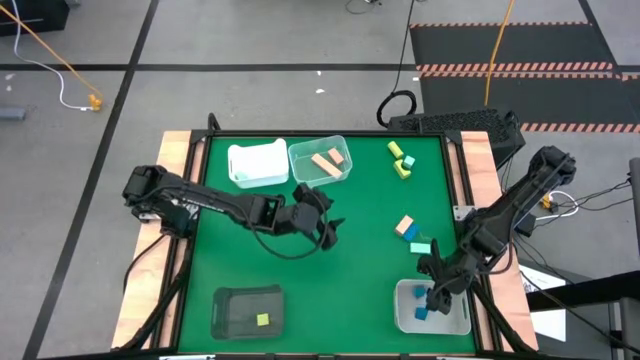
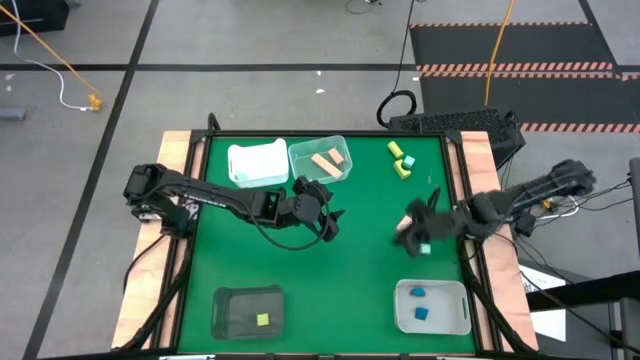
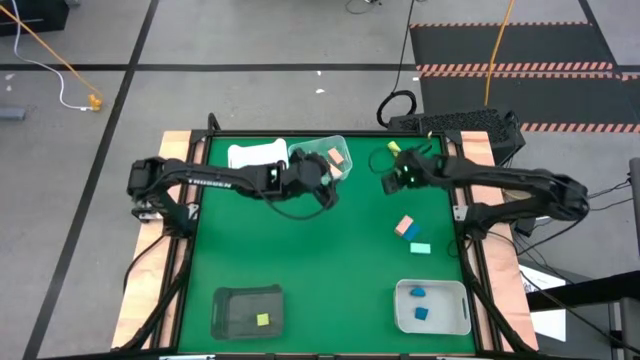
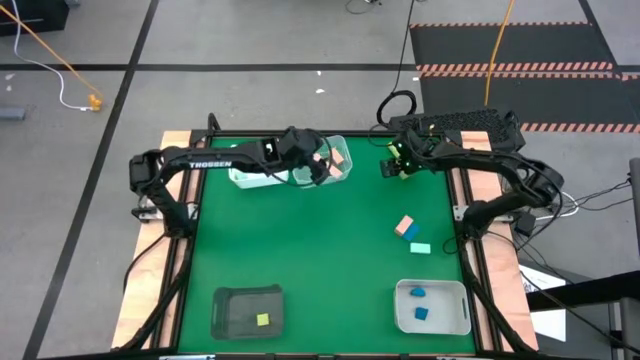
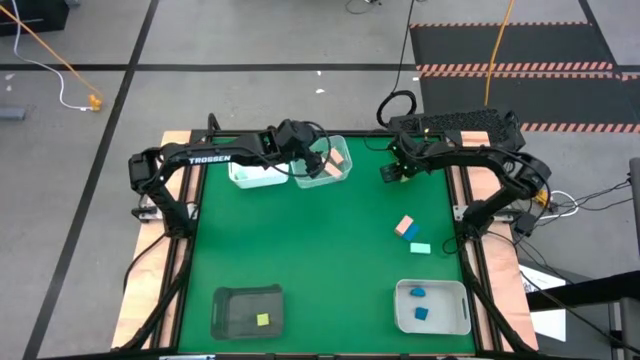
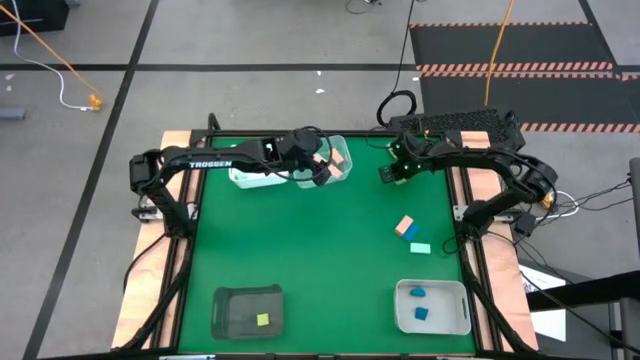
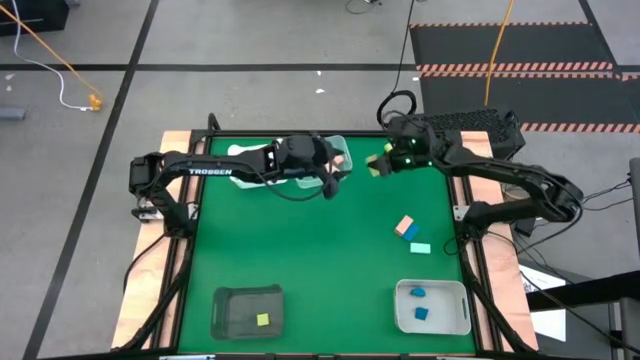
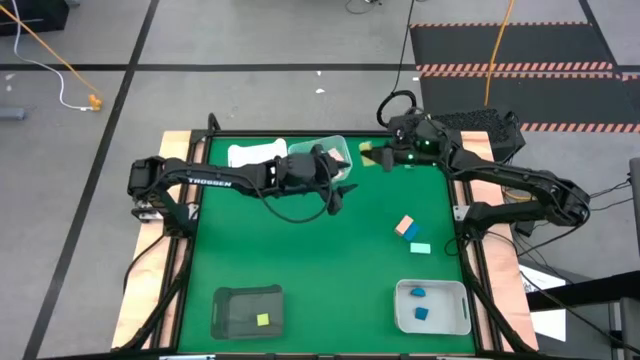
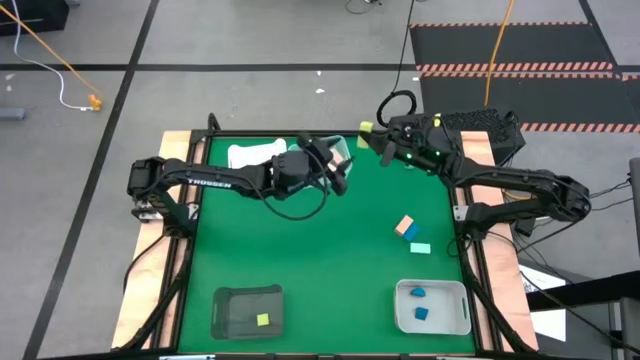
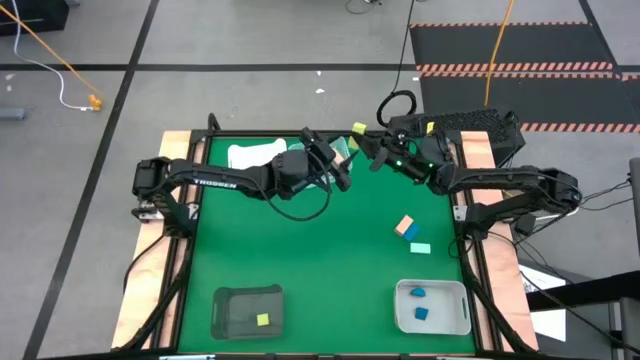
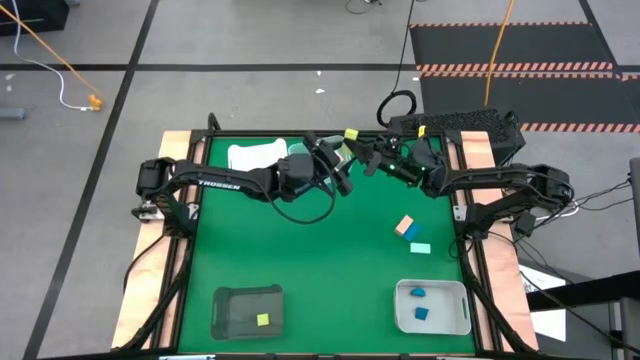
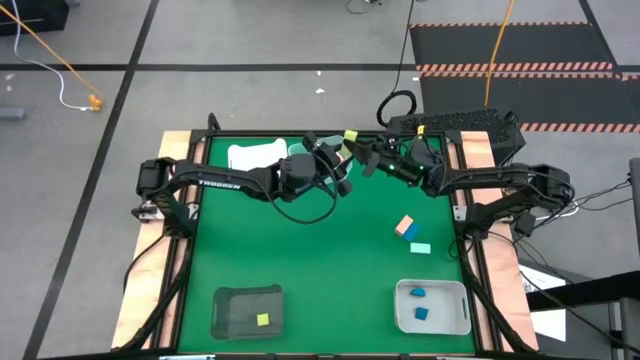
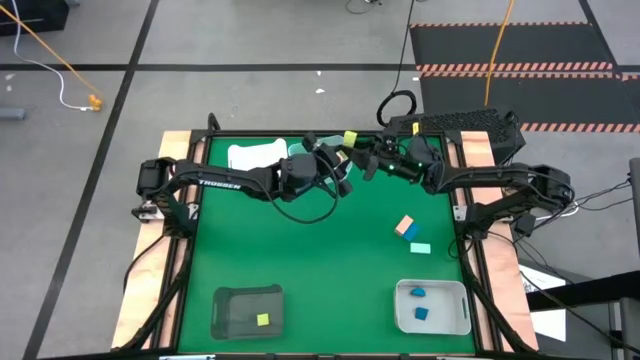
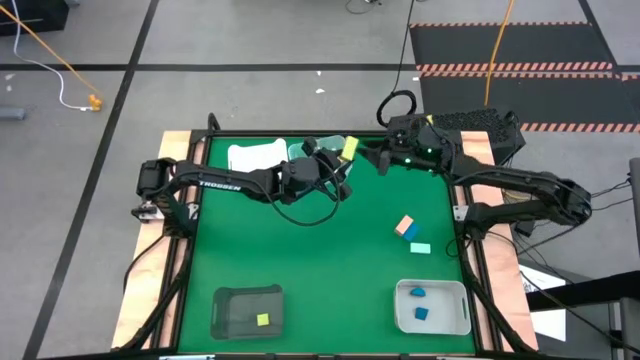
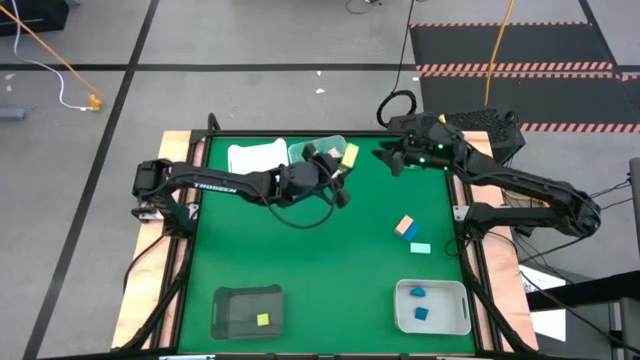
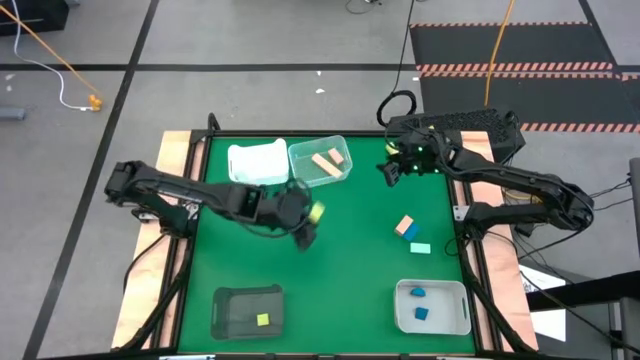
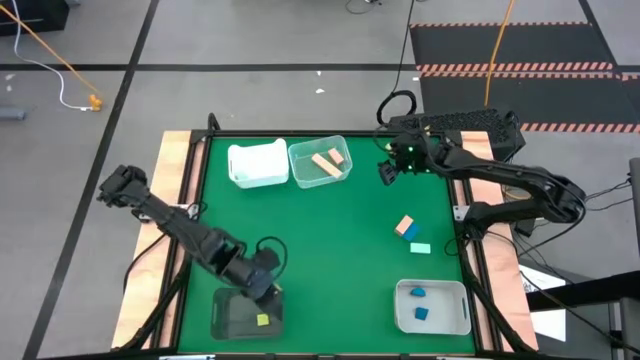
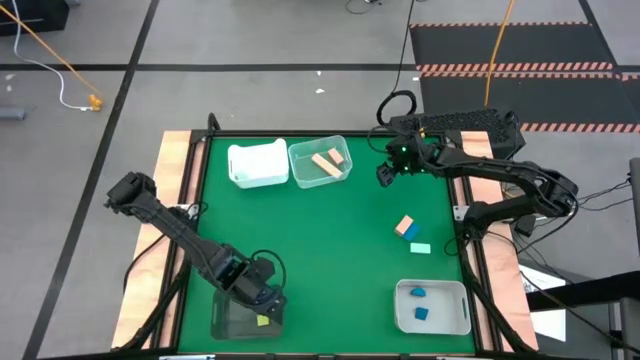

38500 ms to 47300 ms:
Task: Sort & place blocks by color
Put the middle yellow block into the black bin

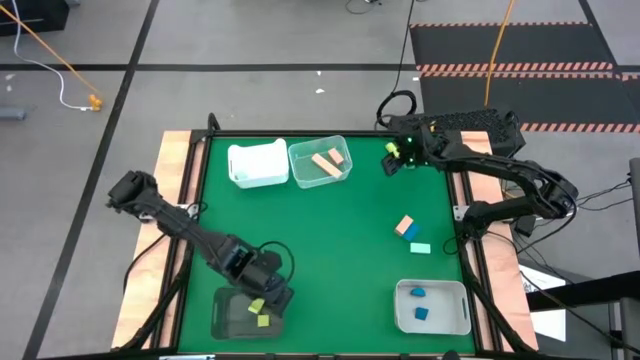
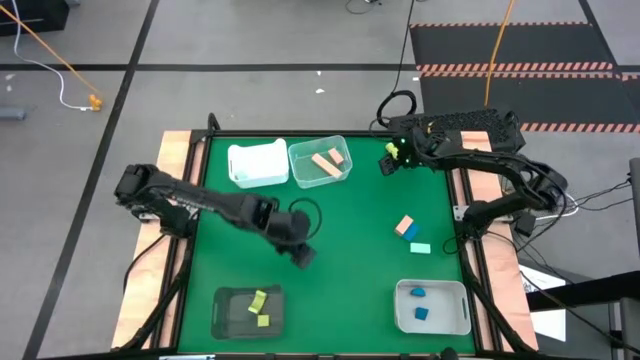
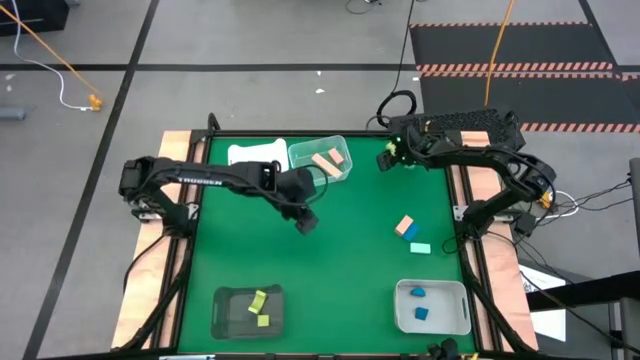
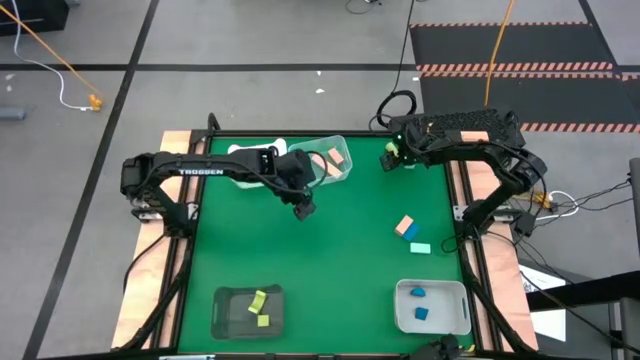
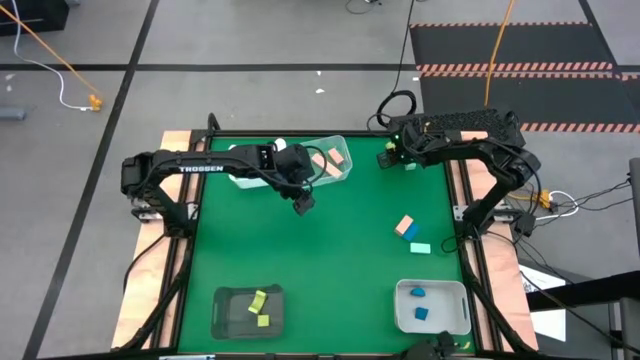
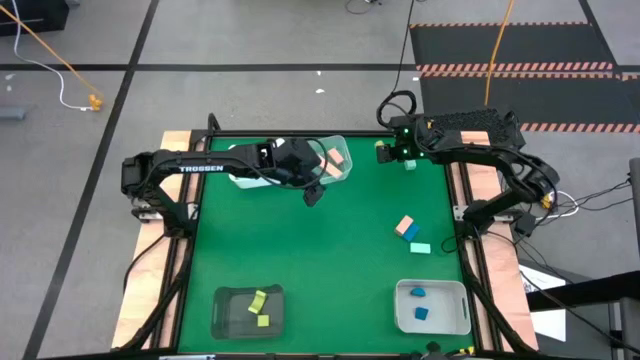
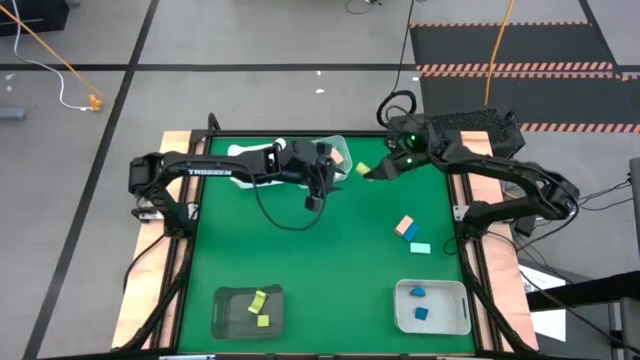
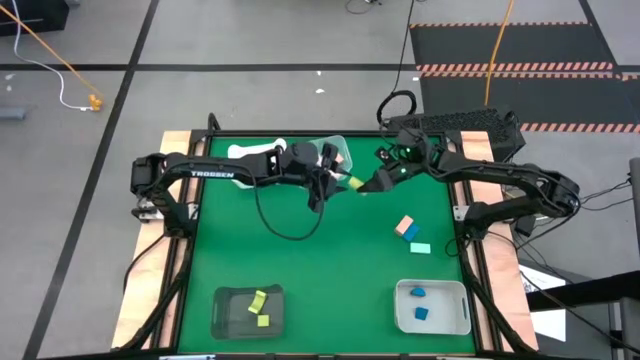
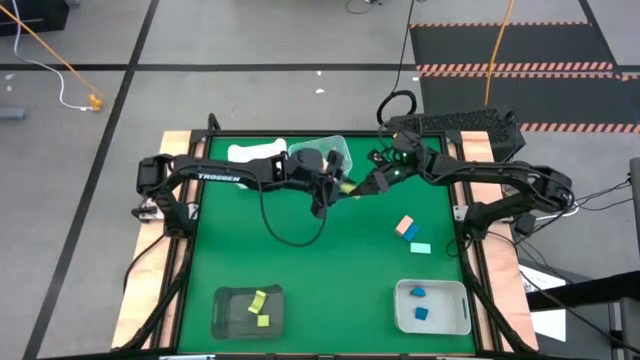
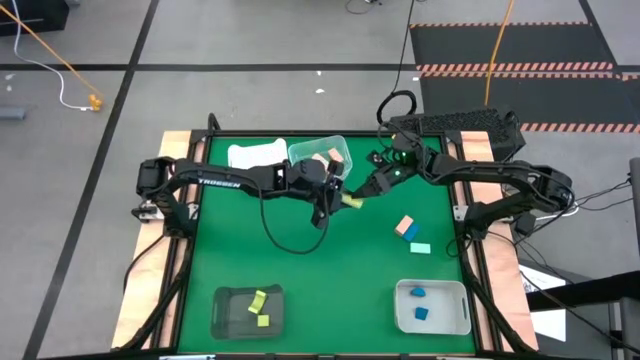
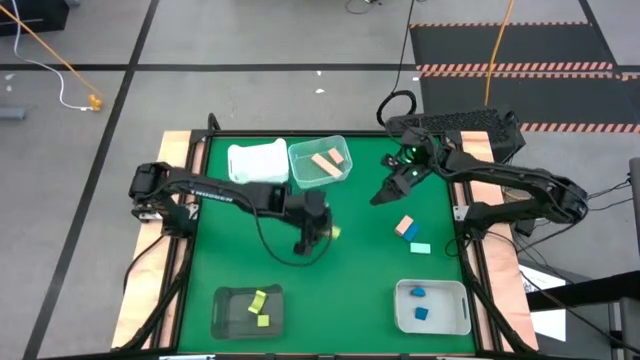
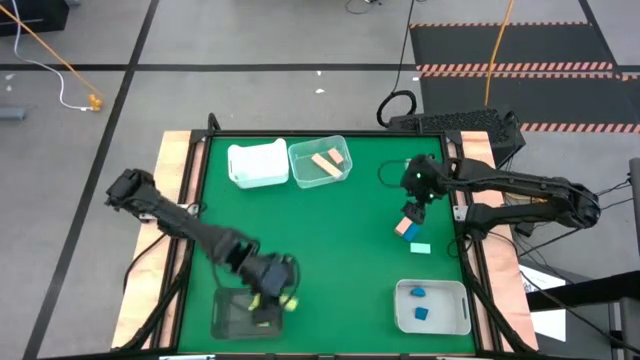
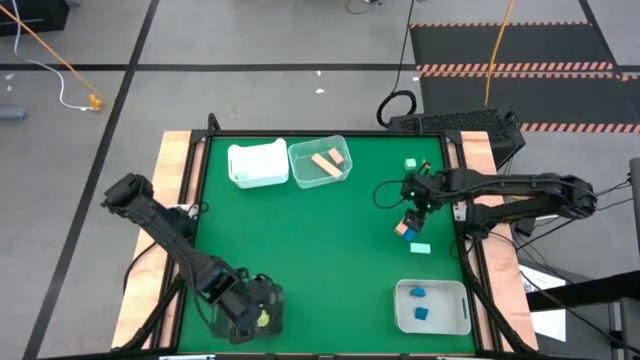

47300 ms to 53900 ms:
Put the yellow block into the black bin

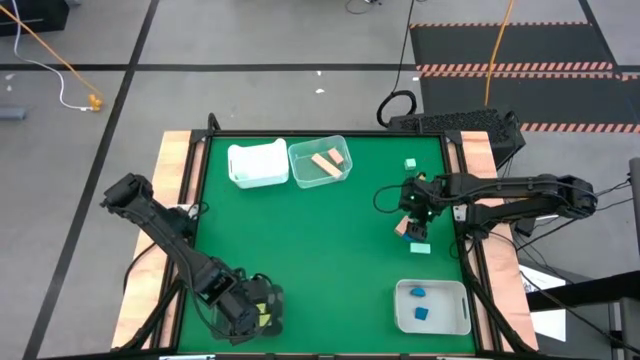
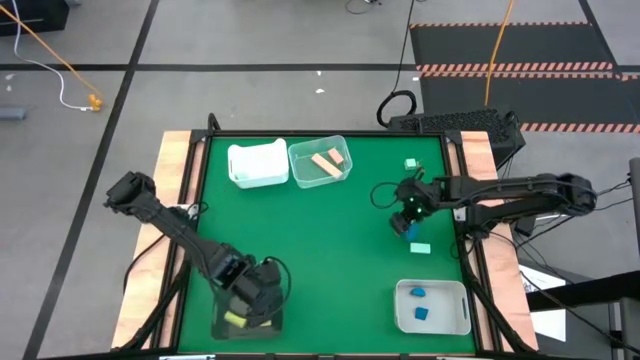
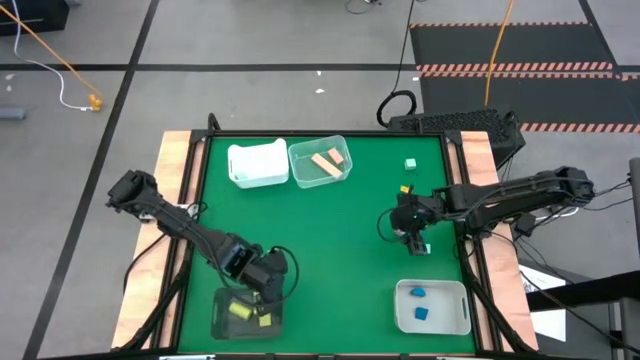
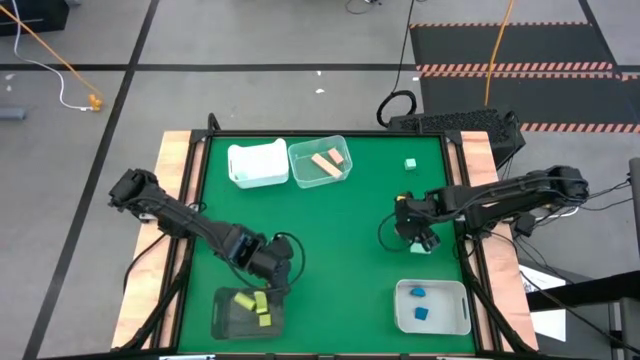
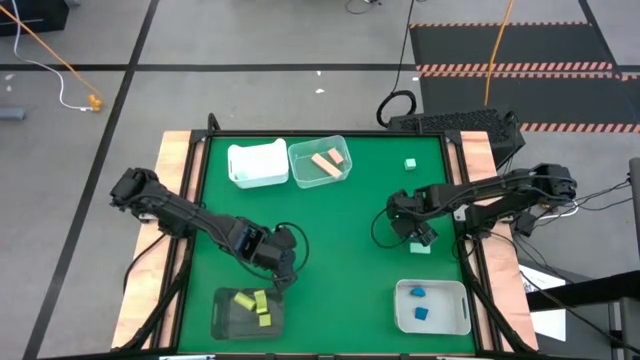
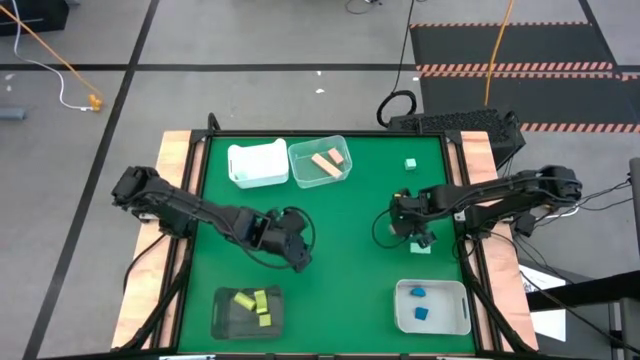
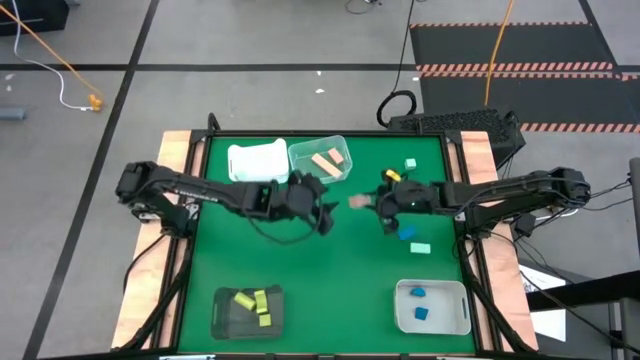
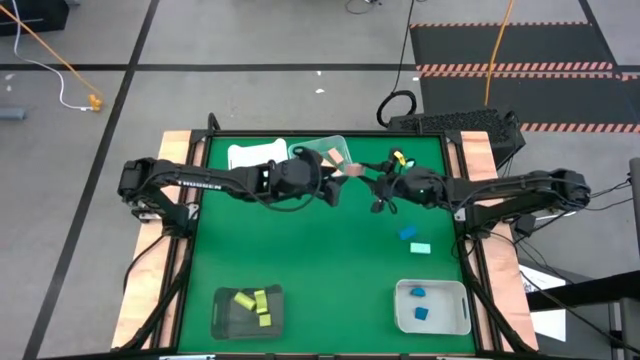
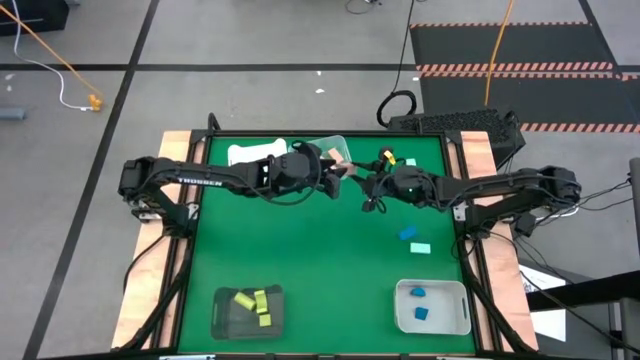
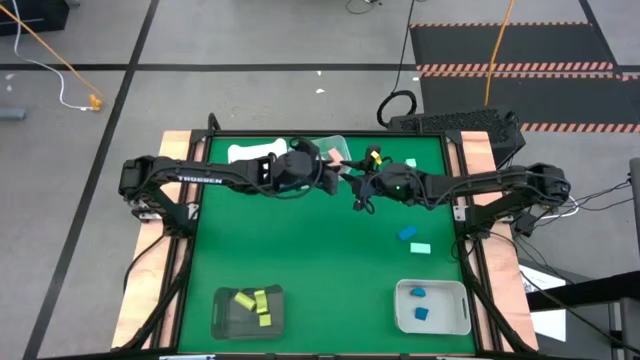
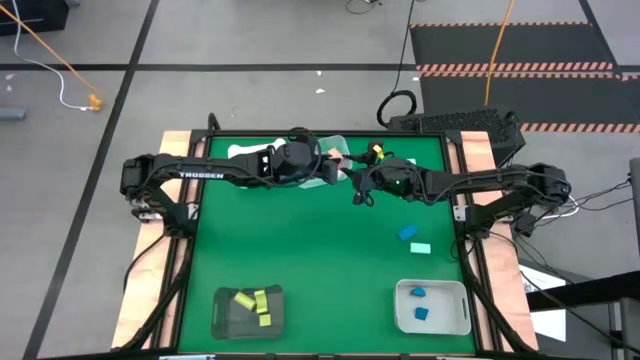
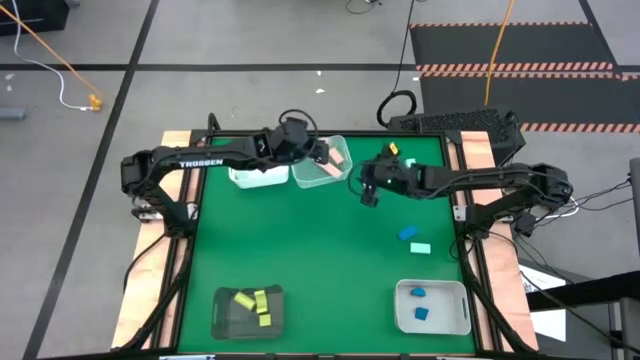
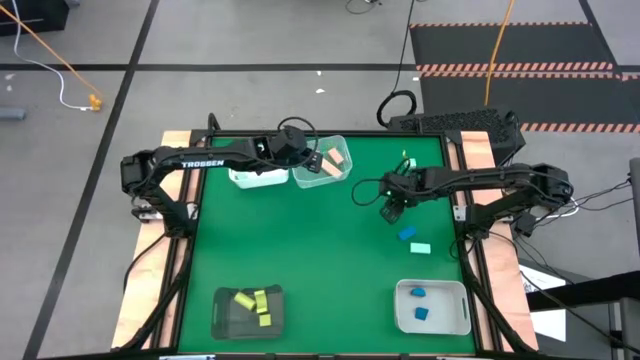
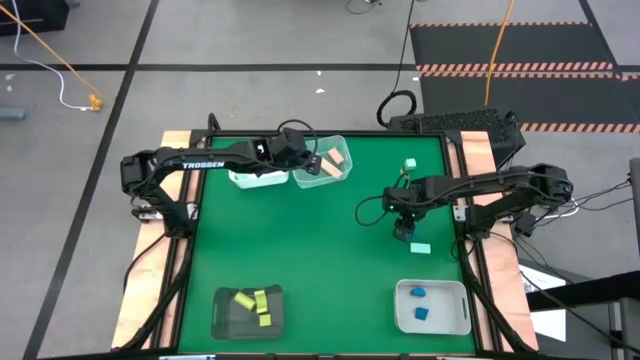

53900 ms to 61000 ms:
Put the brown block into the transparent bin
